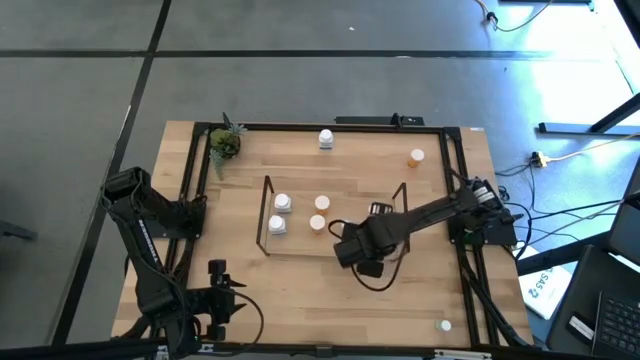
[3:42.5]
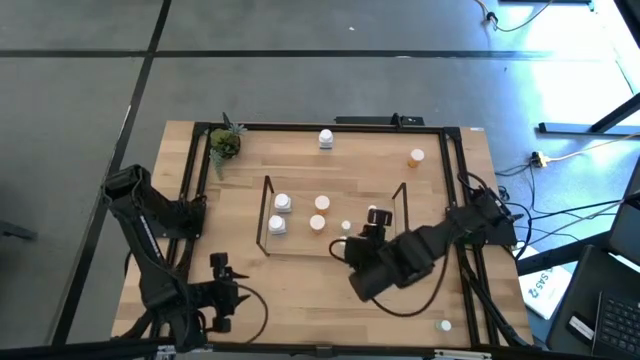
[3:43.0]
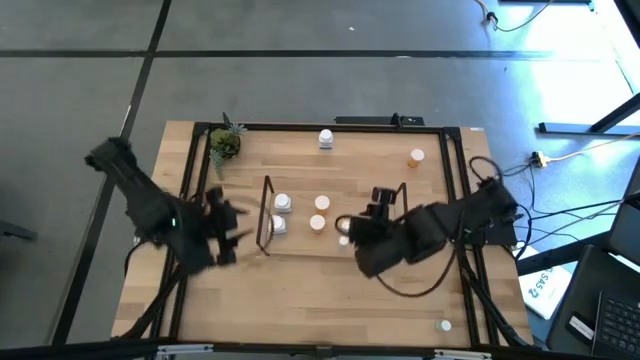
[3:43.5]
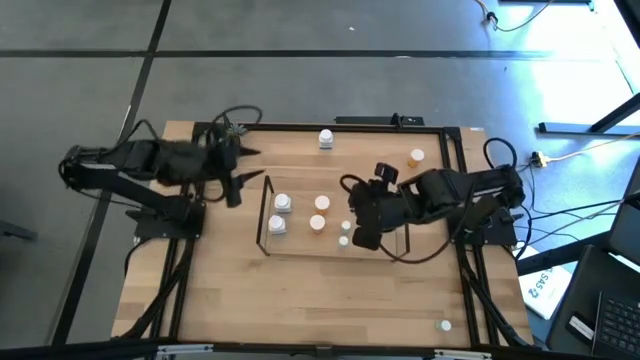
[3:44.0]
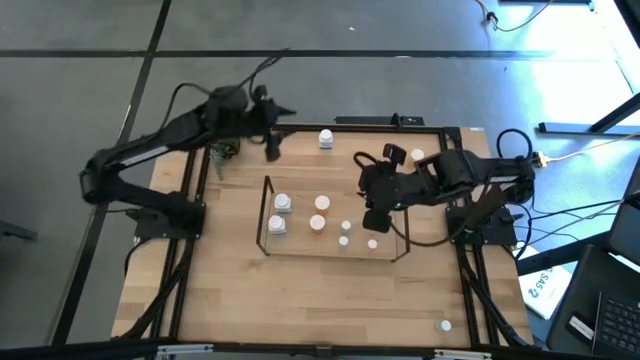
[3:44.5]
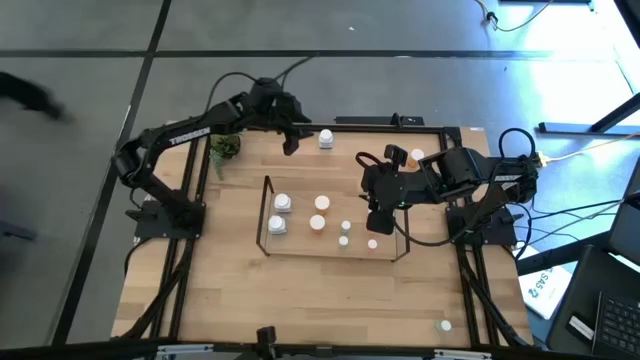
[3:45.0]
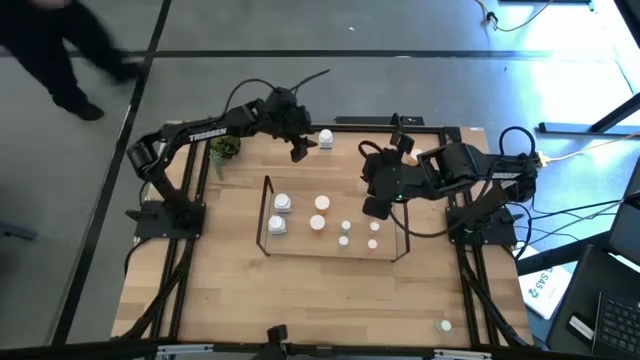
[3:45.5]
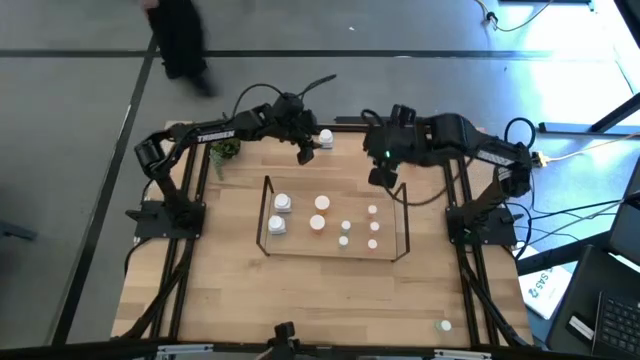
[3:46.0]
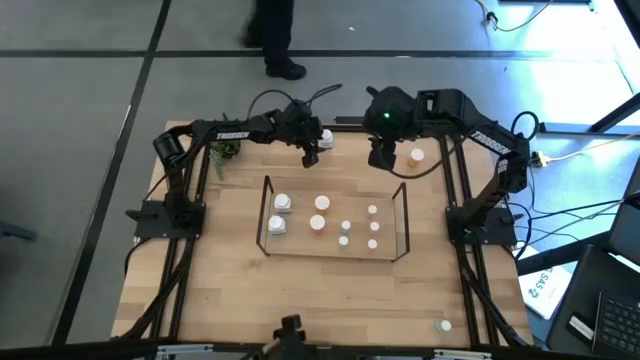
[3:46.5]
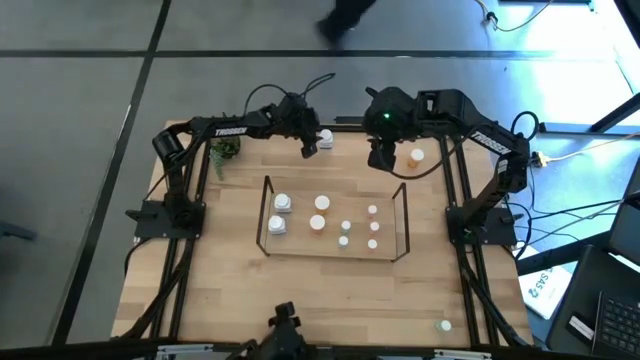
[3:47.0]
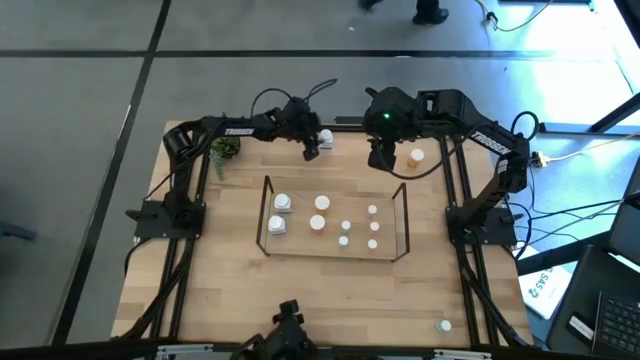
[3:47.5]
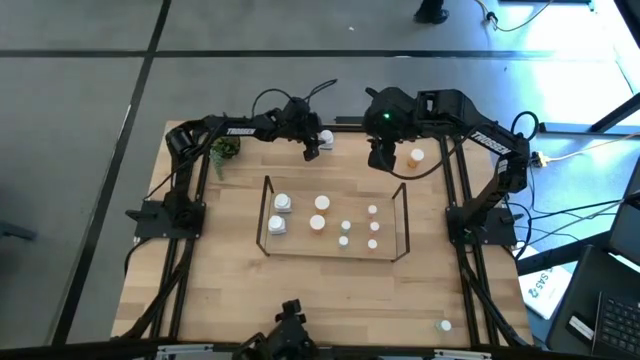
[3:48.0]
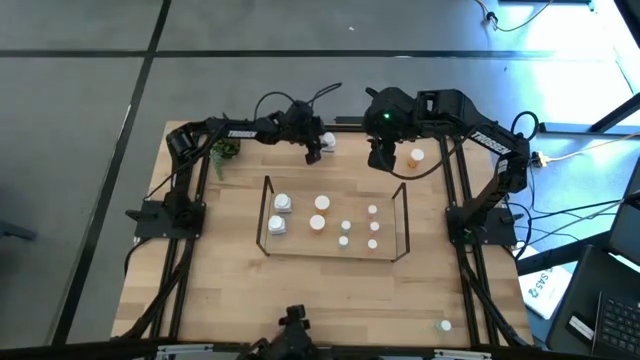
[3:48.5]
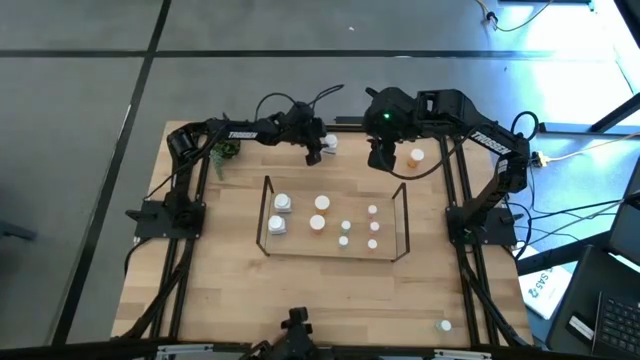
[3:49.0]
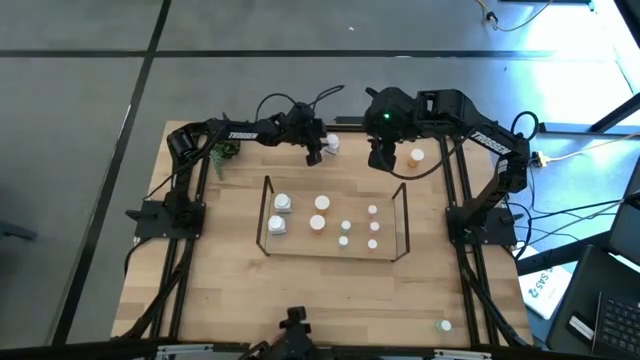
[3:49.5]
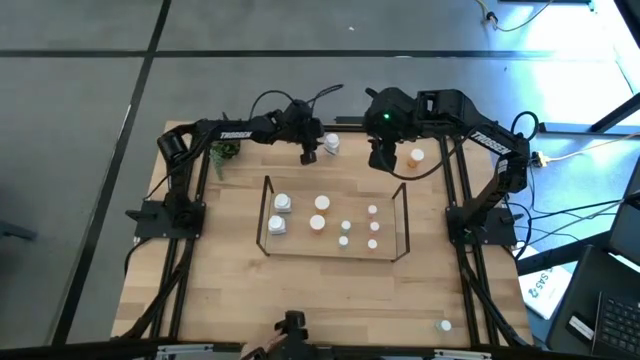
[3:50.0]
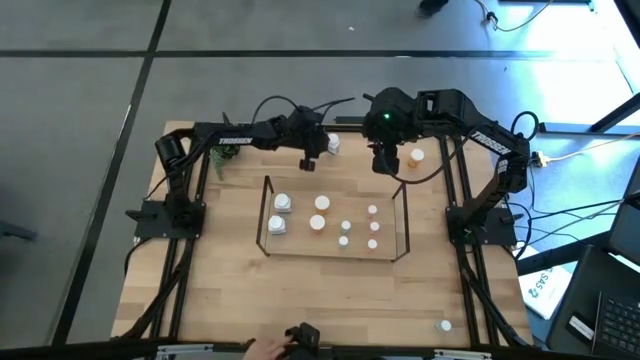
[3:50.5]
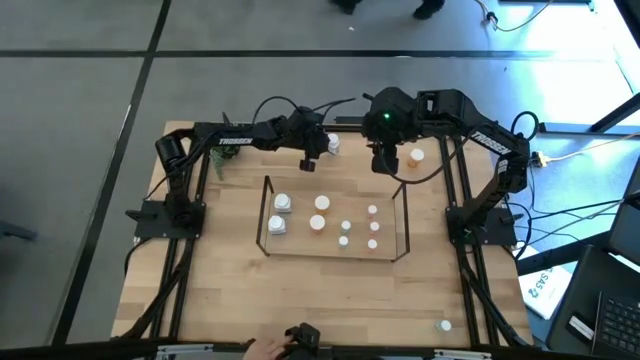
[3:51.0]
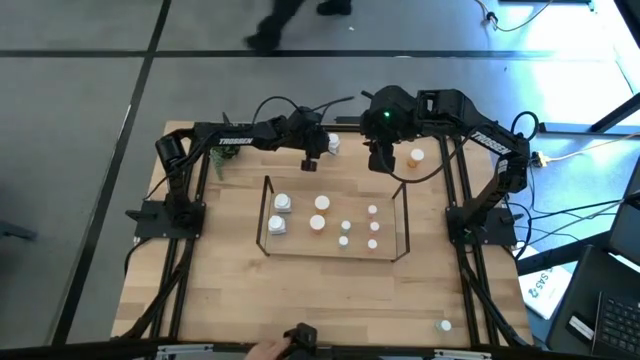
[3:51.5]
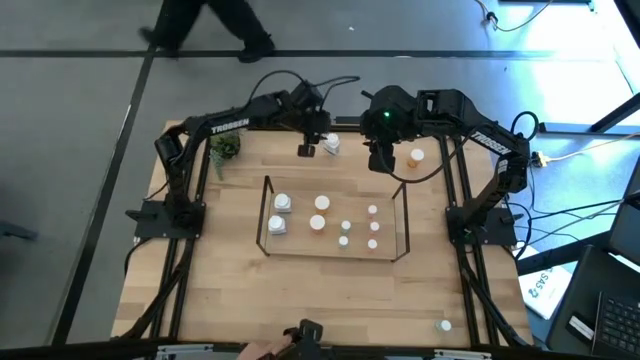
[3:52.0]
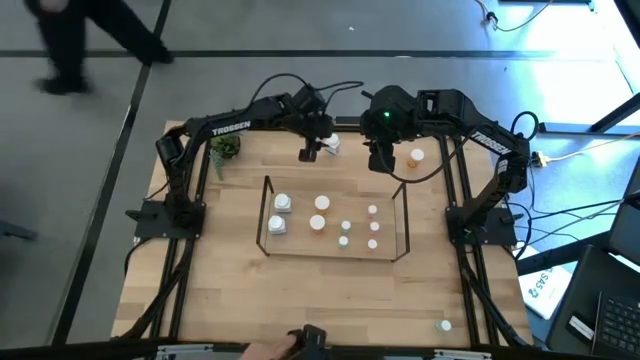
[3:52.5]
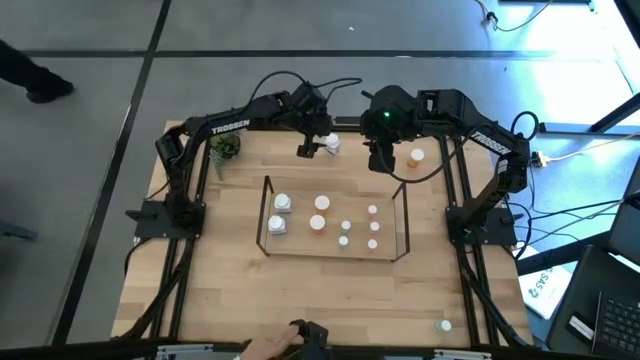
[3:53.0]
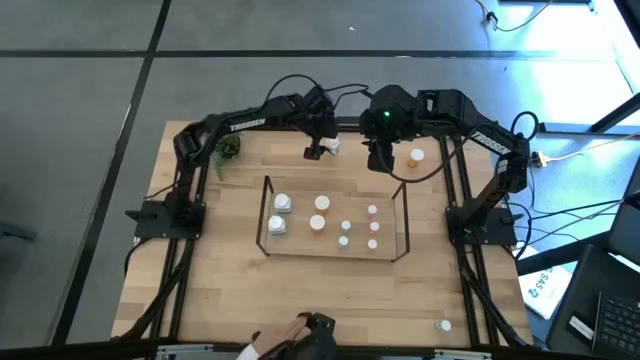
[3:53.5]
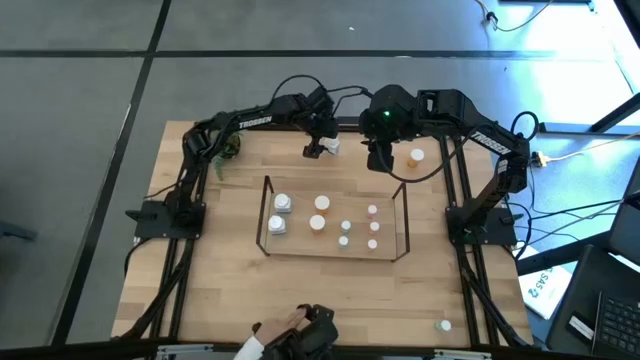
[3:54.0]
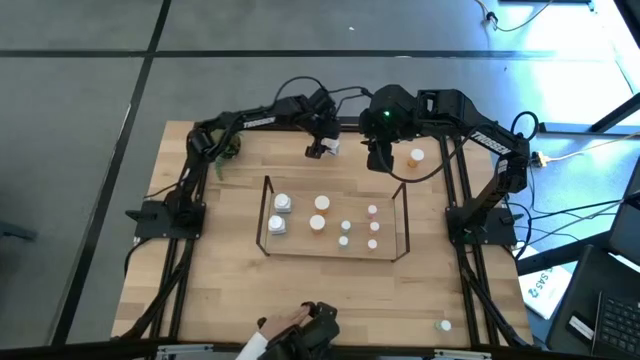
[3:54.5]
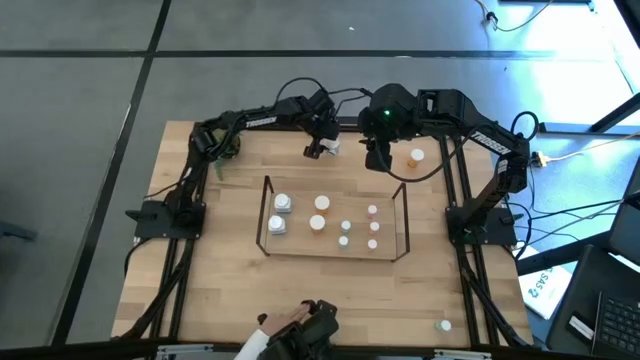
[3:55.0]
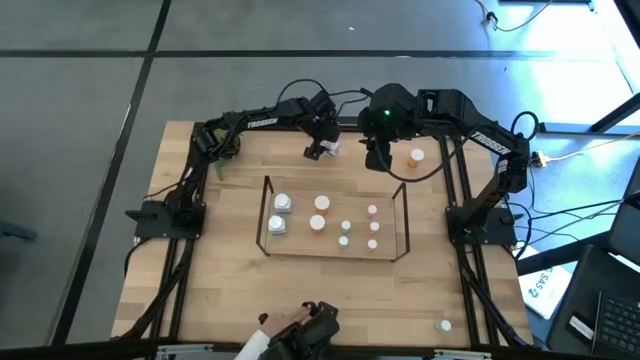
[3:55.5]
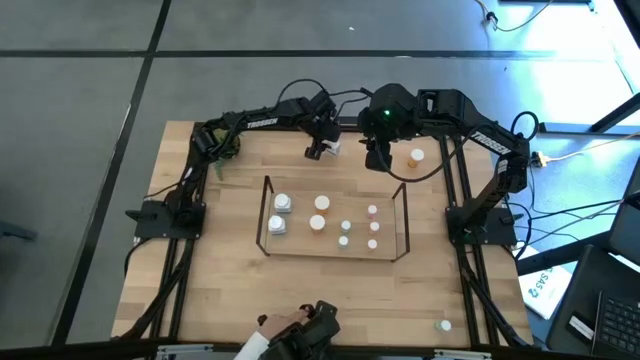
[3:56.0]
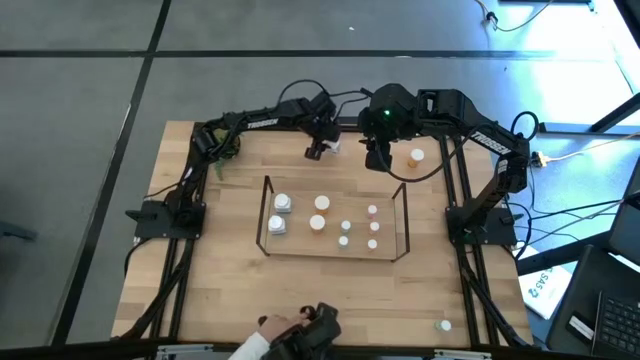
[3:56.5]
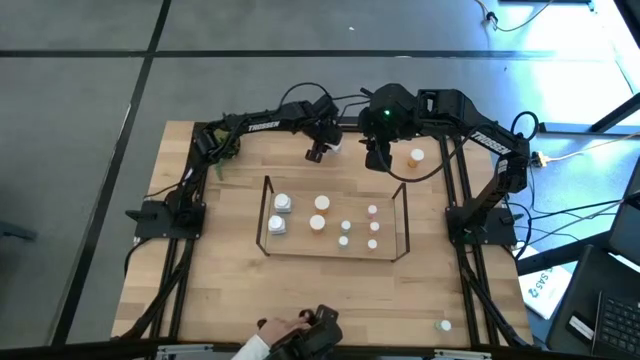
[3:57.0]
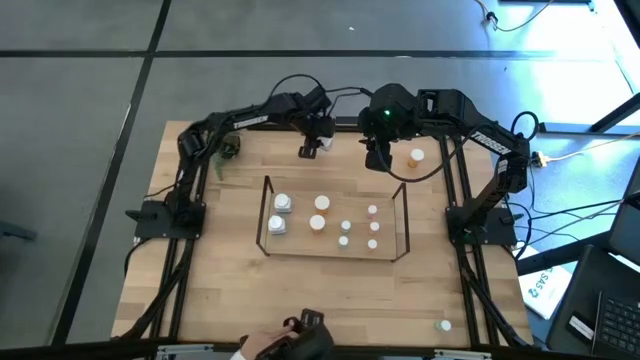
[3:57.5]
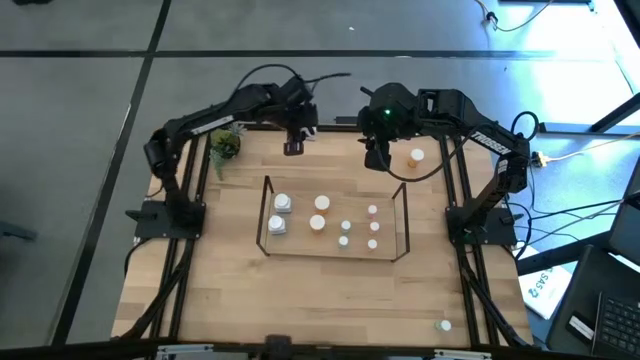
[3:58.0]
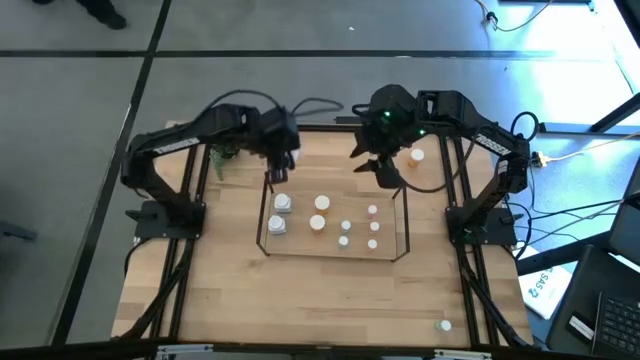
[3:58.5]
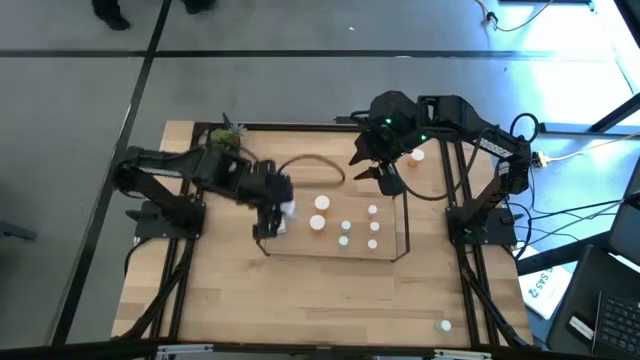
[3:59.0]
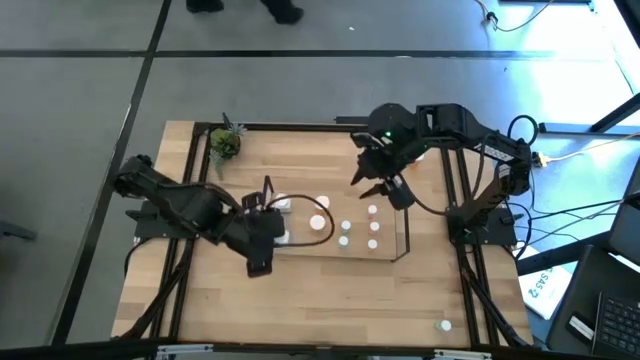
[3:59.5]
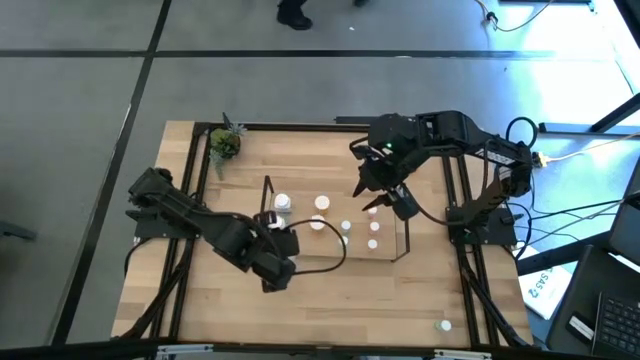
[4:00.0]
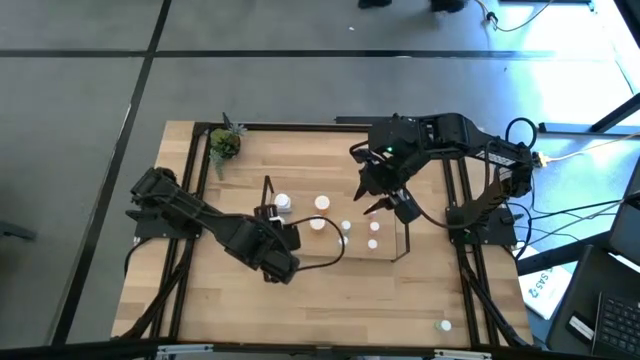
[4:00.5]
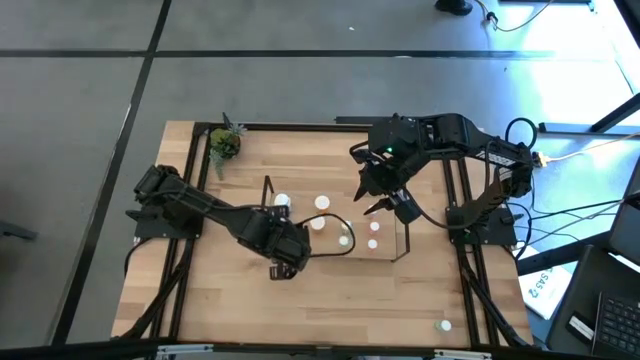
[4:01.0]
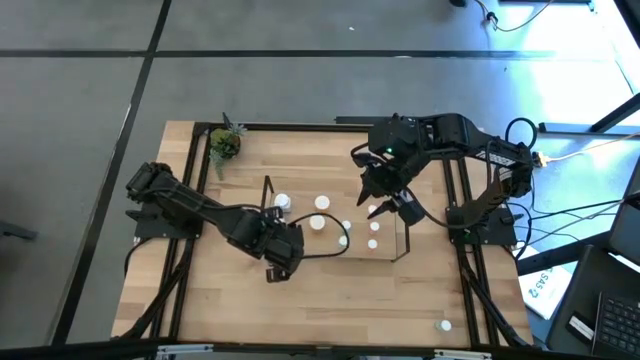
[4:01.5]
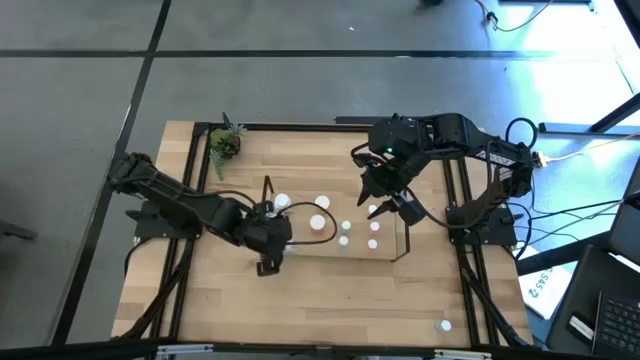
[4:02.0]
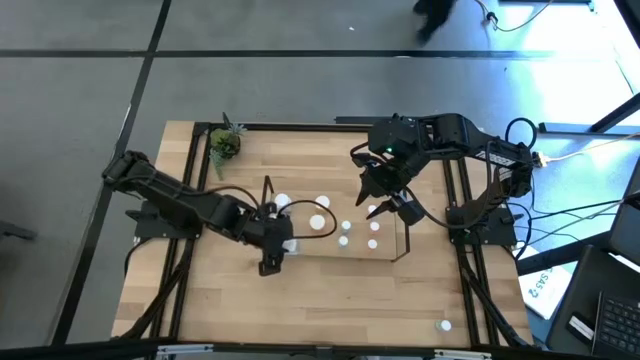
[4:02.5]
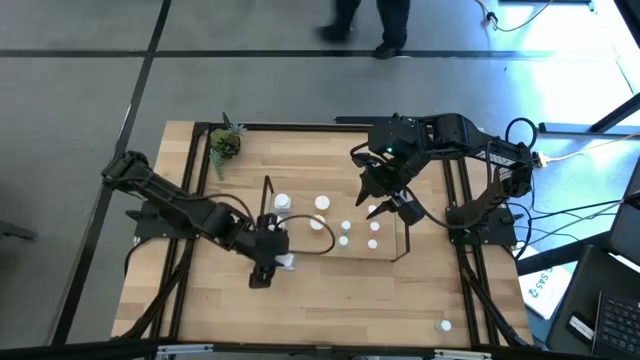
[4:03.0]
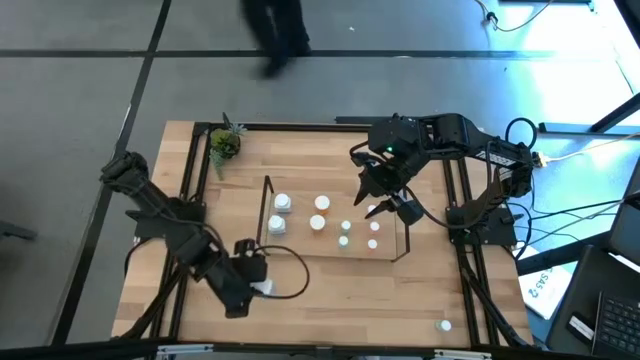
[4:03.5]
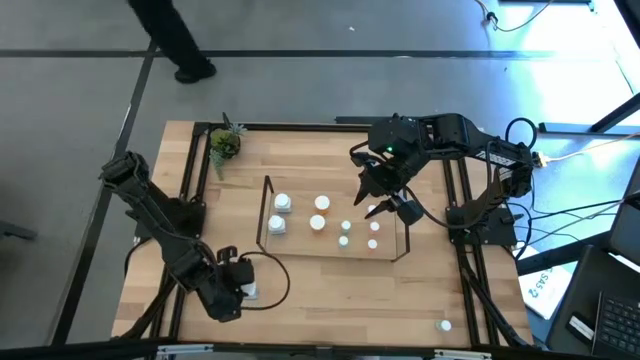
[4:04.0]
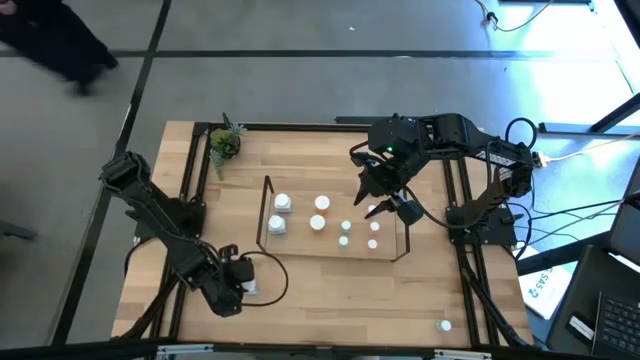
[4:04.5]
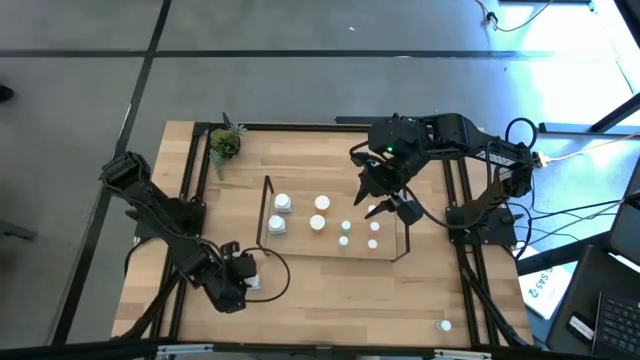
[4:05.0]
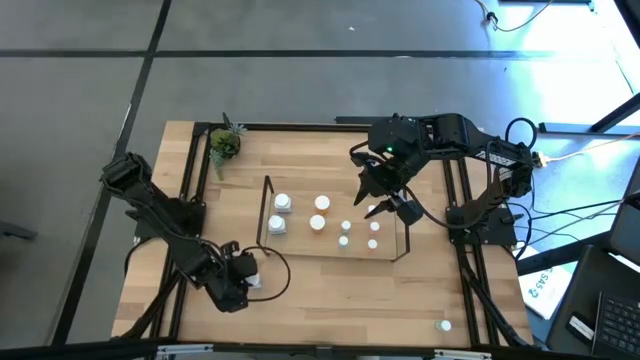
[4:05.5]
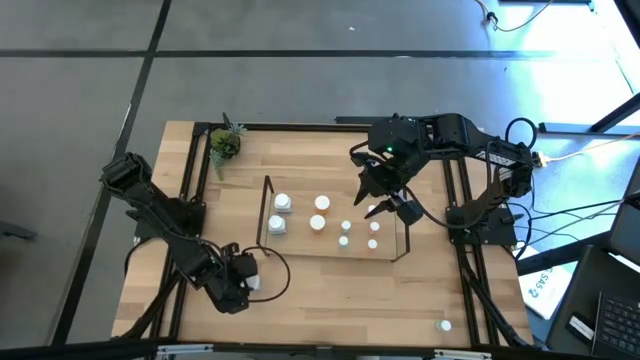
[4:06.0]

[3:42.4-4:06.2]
Task: Pick and place medicine bottles onto shelf by color
Put the white pill bottle on the shelf aligned with the other white pill bottle
